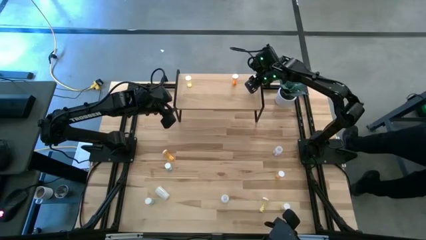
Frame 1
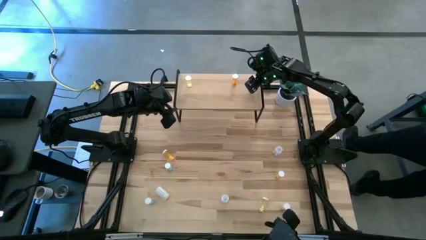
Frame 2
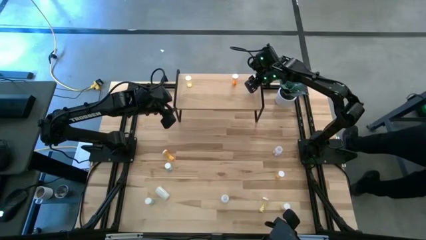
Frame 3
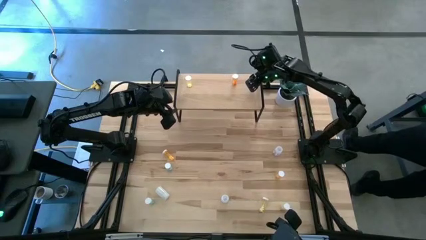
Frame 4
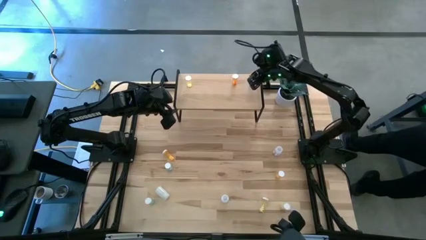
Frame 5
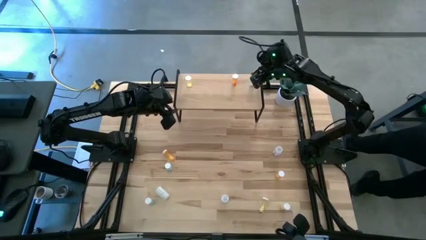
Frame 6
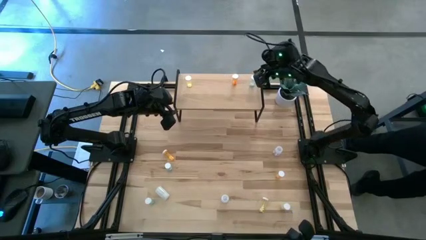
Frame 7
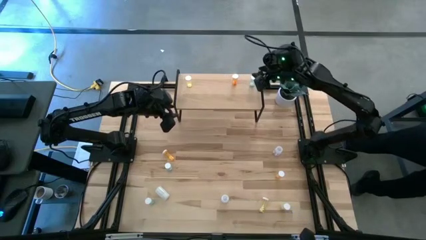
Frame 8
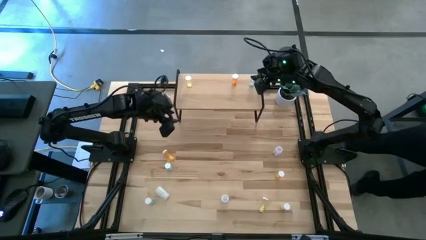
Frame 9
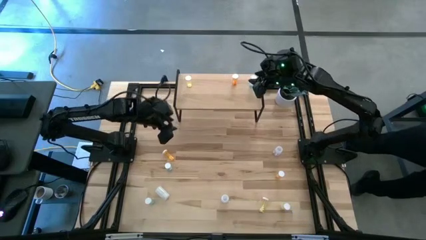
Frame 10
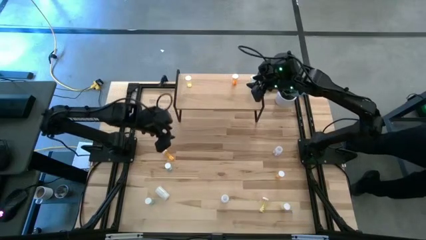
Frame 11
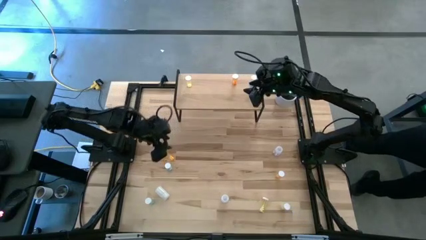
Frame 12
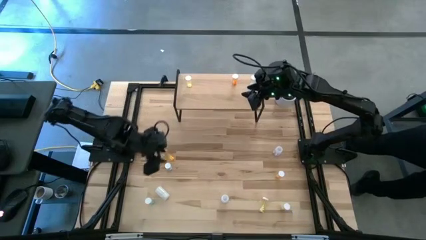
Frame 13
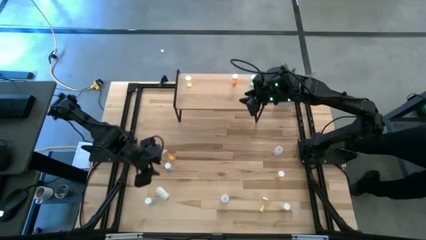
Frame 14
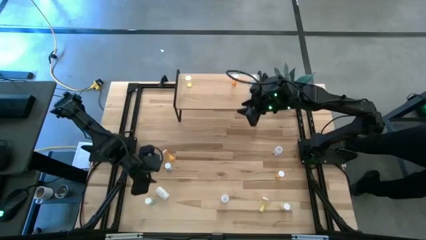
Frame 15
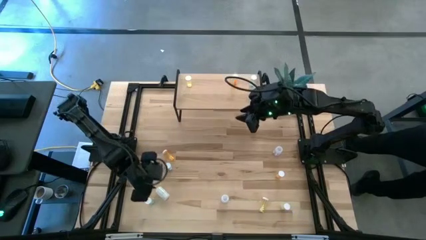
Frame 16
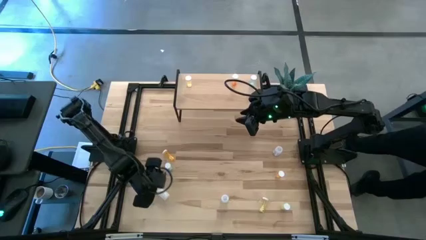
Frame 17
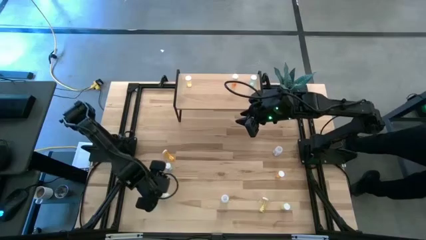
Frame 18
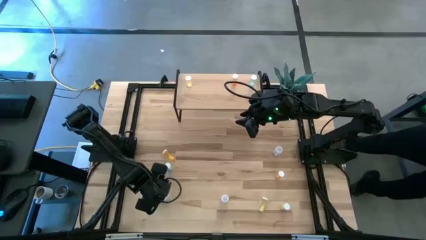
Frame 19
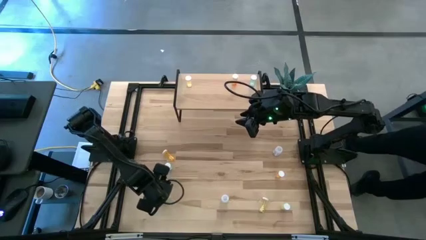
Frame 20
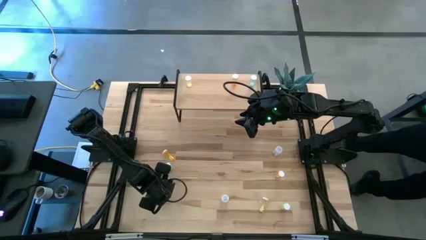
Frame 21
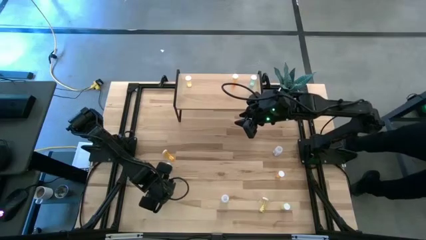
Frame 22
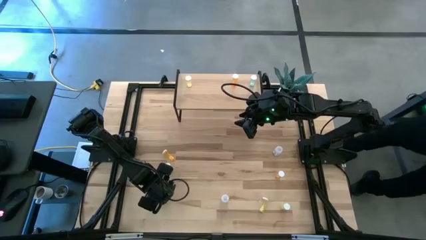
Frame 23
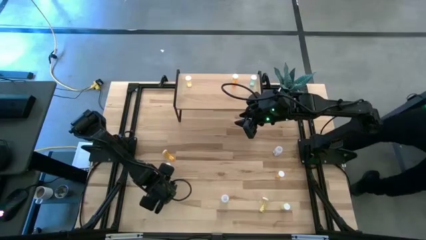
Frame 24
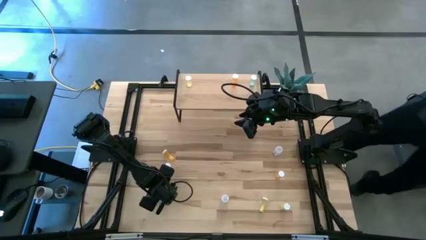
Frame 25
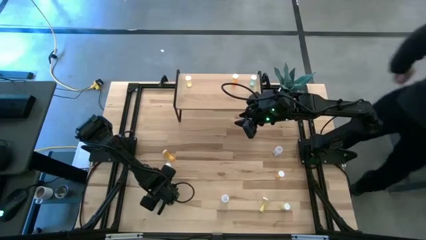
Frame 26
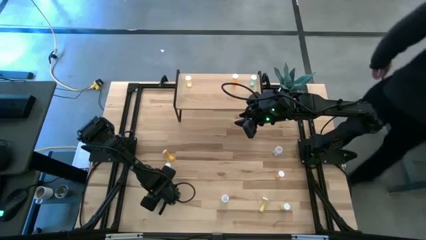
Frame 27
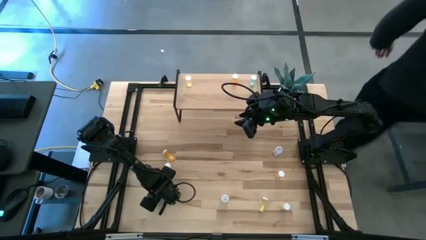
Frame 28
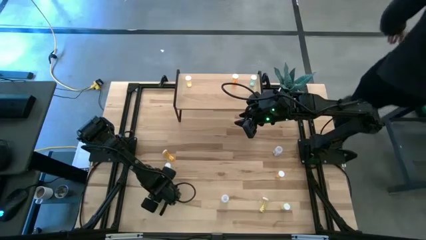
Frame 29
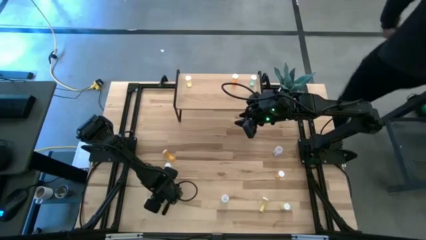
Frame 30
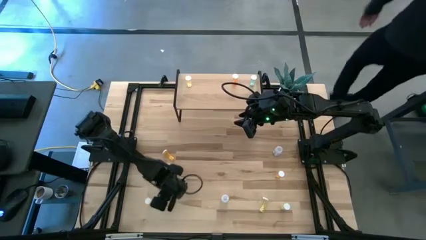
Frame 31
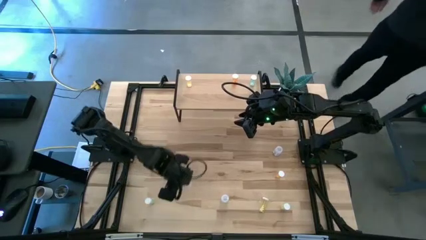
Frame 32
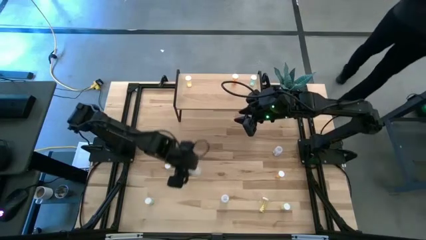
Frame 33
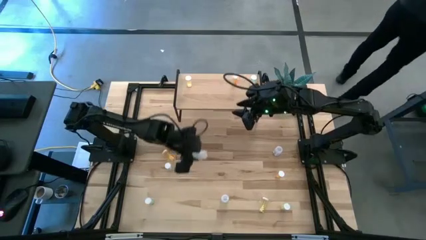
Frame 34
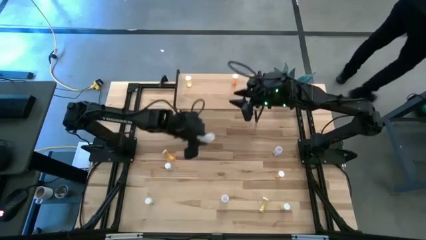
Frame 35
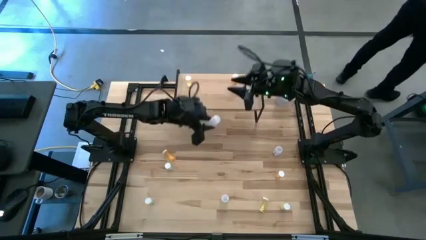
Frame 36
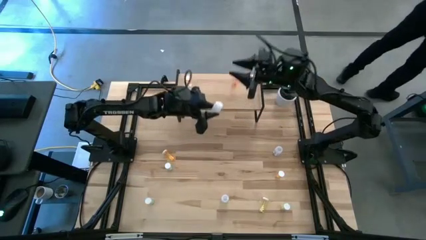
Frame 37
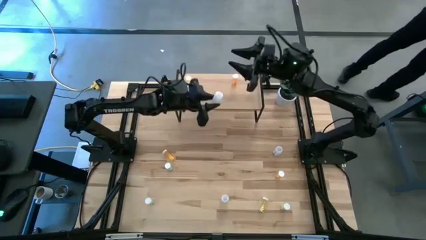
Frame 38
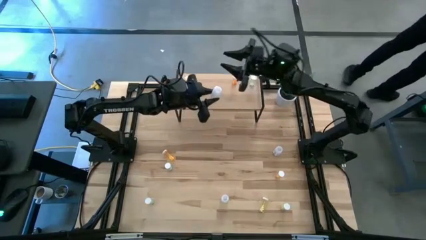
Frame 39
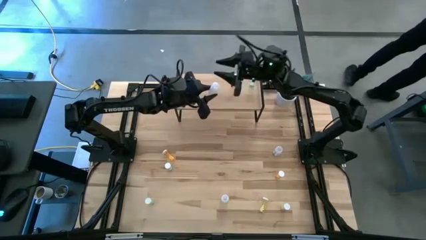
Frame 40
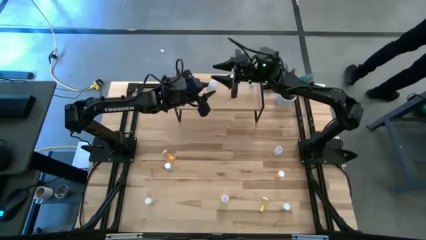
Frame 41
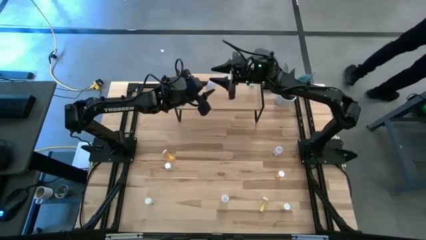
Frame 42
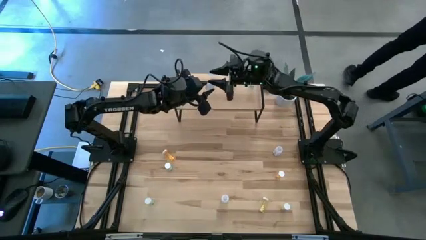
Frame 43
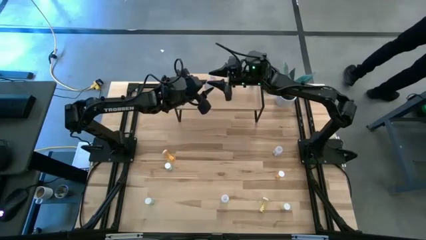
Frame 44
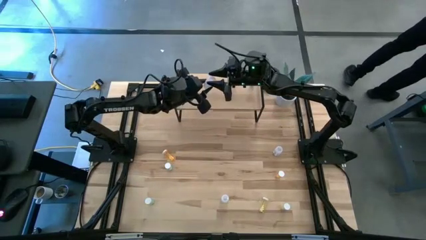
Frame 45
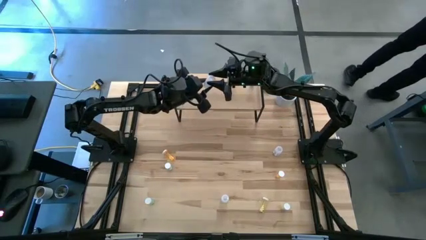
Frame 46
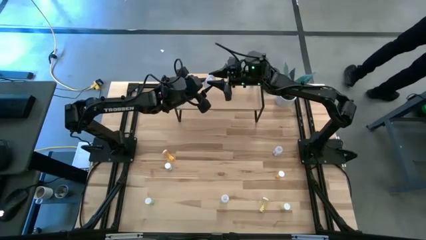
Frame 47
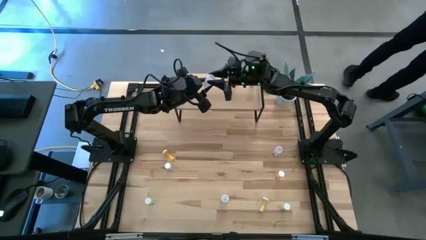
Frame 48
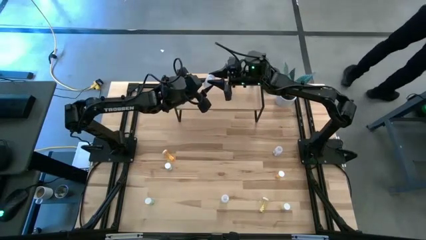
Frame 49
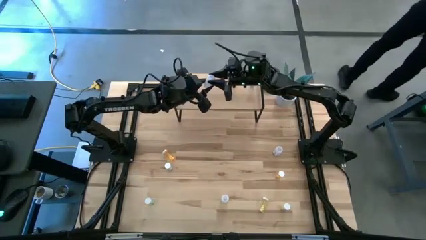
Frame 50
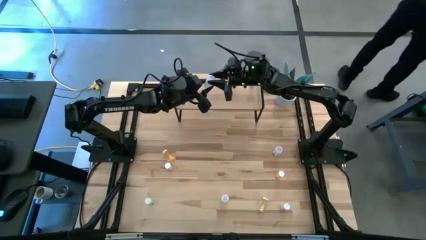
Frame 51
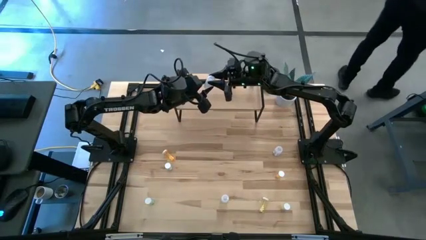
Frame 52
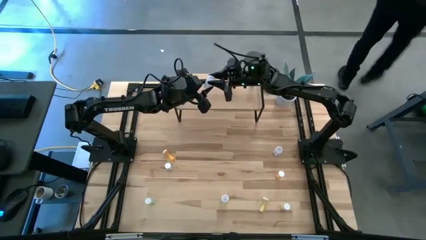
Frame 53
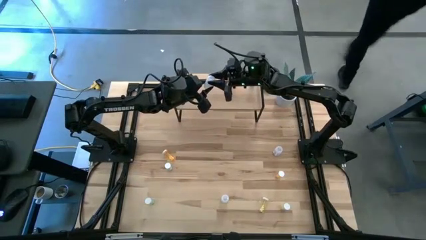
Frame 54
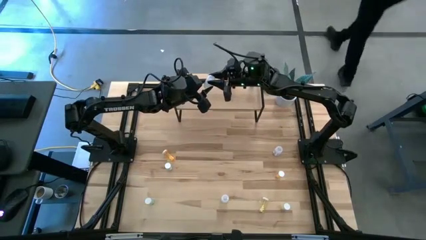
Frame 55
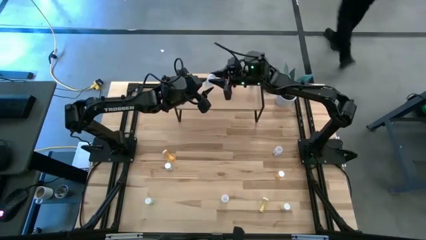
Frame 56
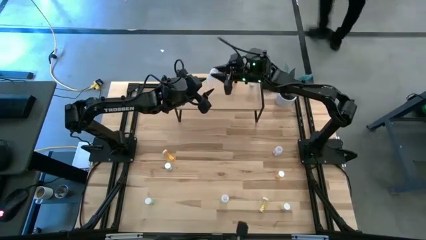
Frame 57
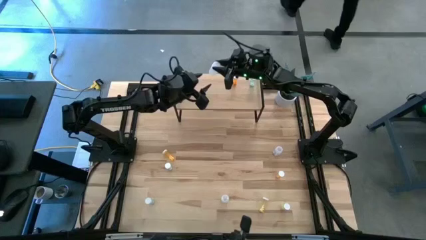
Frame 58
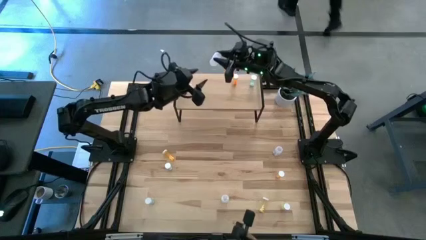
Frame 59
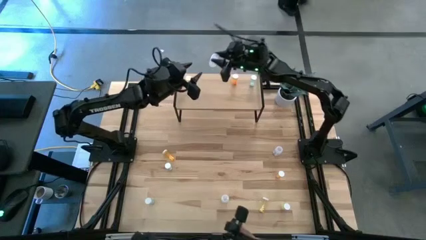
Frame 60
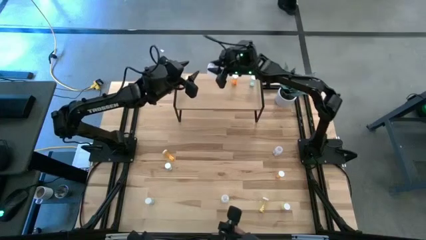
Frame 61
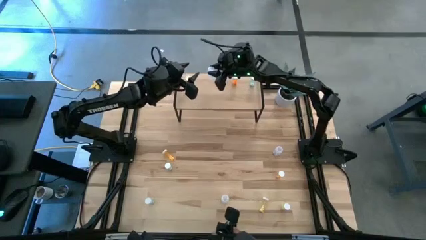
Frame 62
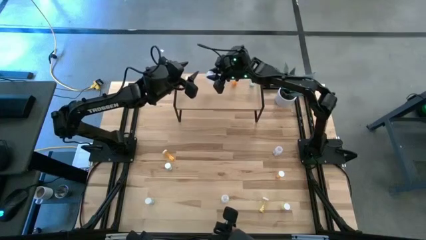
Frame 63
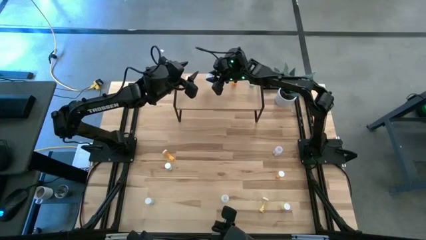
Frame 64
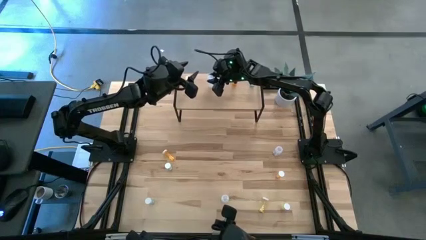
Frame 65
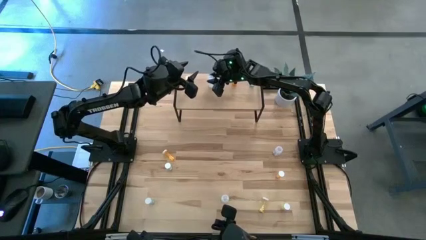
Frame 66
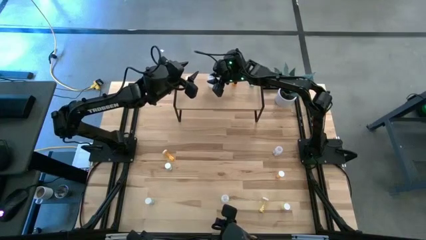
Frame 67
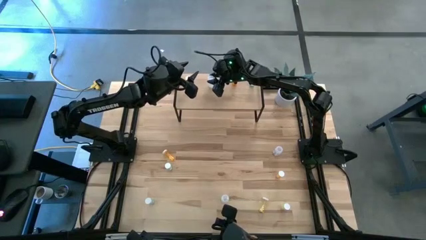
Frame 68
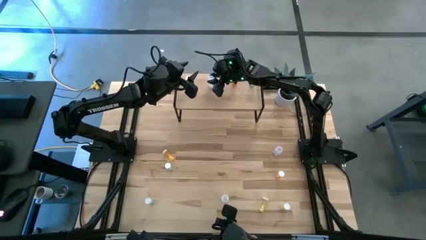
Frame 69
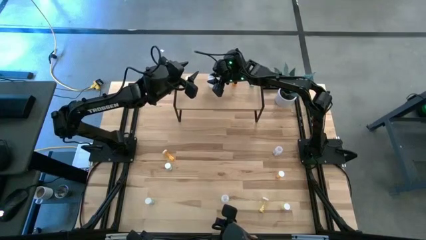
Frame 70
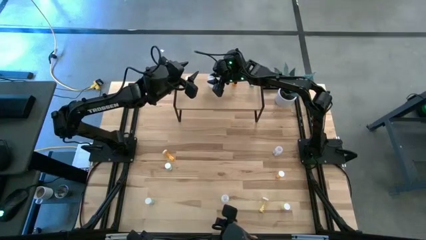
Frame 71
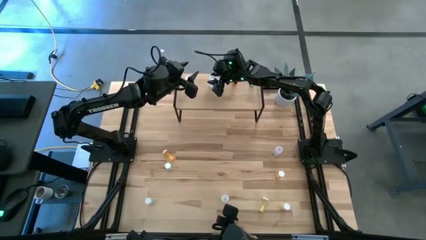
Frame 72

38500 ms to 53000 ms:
Task: Pick and place medicine bottles onto shelf by color
Put the left white medicine bottle on the shelf

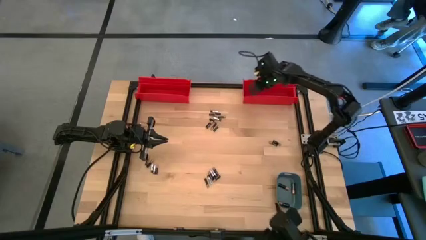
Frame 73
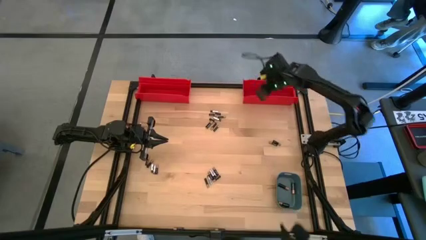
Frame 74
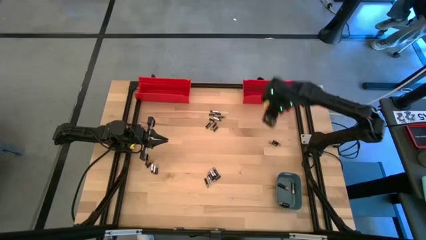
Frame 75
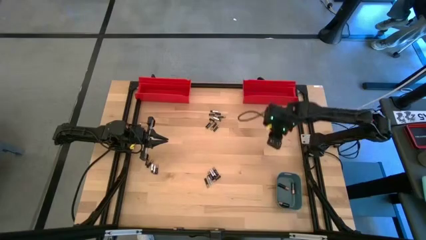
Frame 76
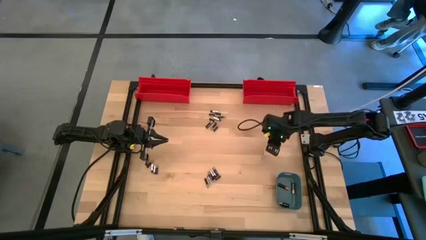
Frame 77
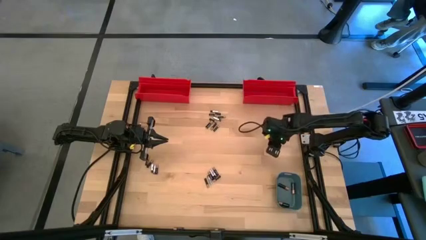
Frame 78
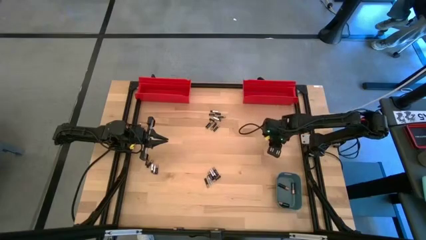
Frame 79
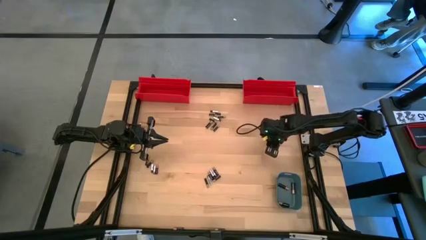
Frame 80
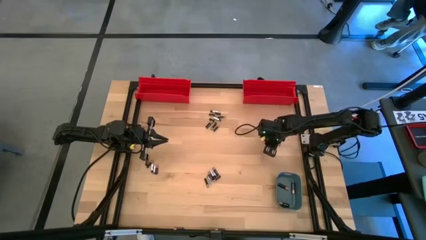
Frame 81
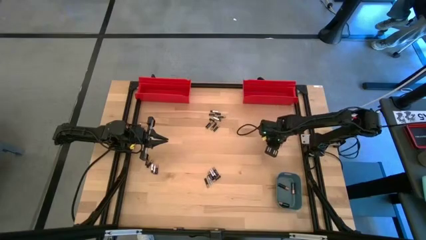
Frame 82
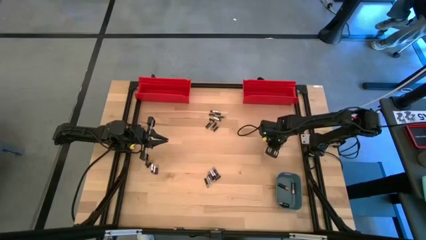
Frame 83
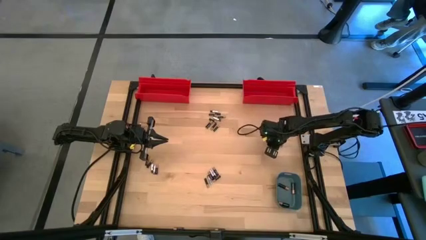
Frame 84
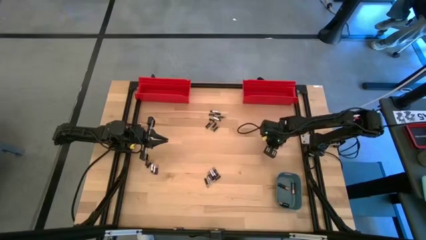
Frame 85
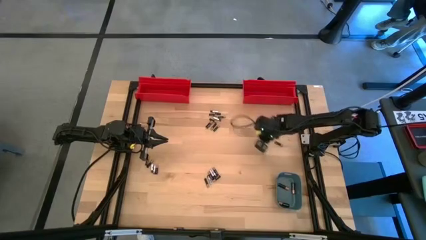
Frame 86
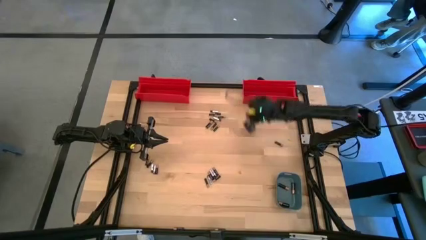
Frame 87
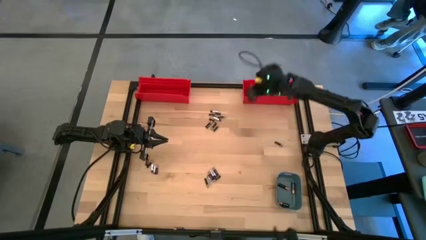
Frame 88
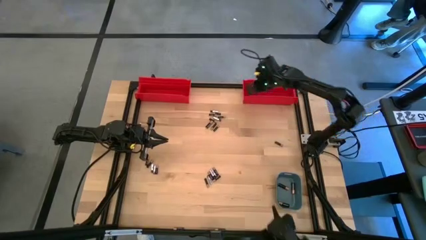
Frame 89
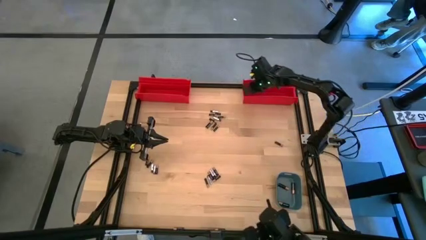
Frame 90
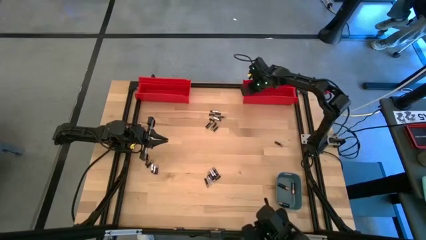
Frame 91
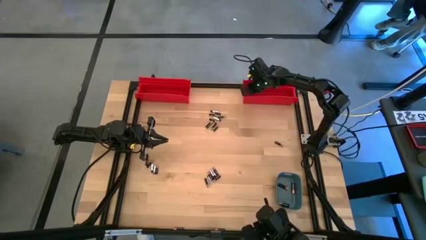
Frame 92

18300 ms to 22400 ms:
Task: Sort batteries
Put the small black battery into the right red bin
